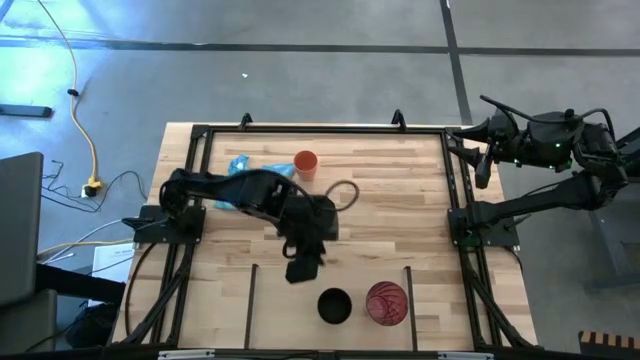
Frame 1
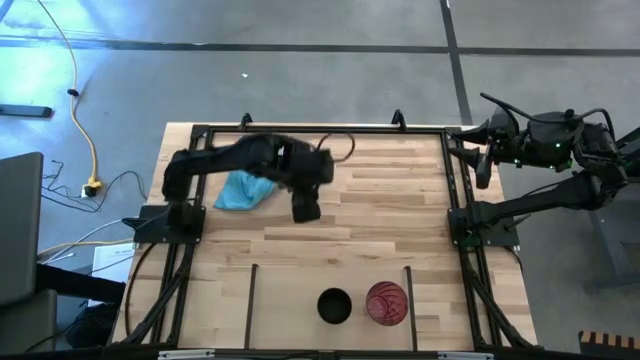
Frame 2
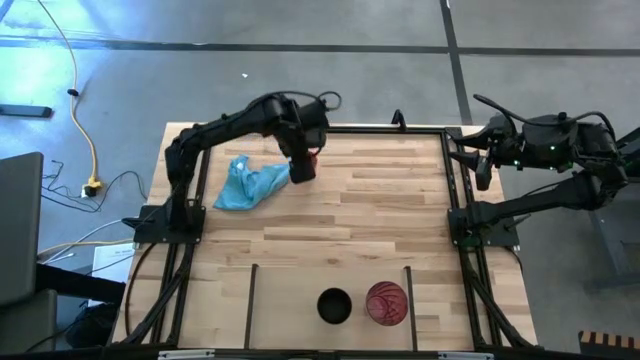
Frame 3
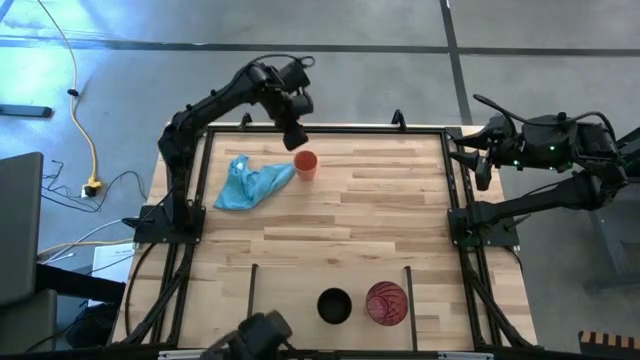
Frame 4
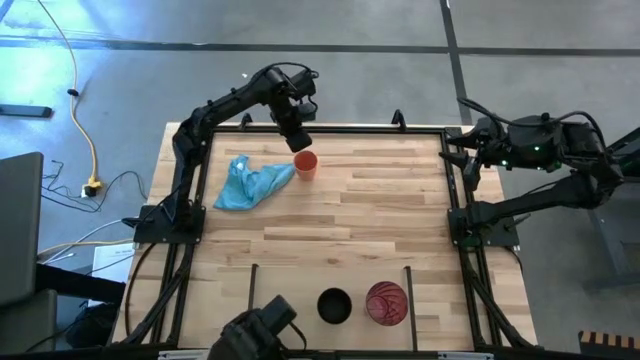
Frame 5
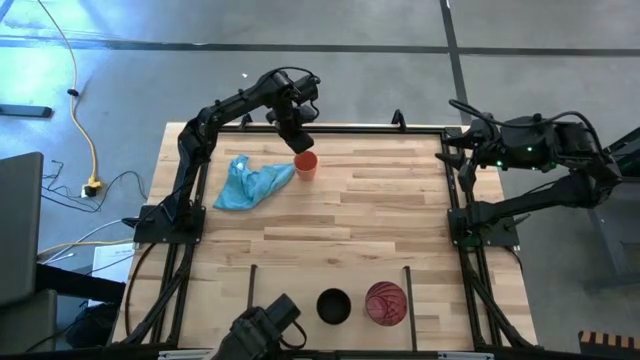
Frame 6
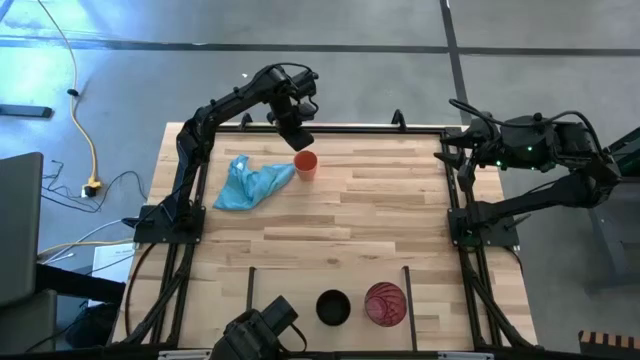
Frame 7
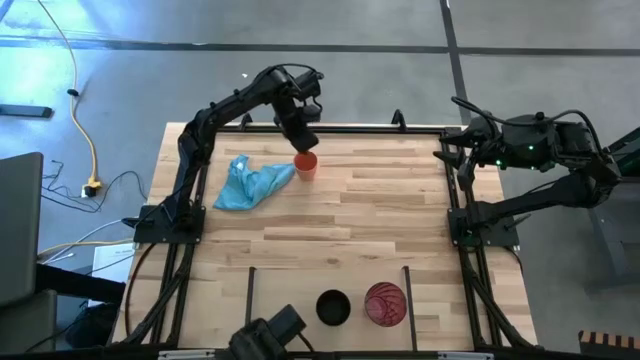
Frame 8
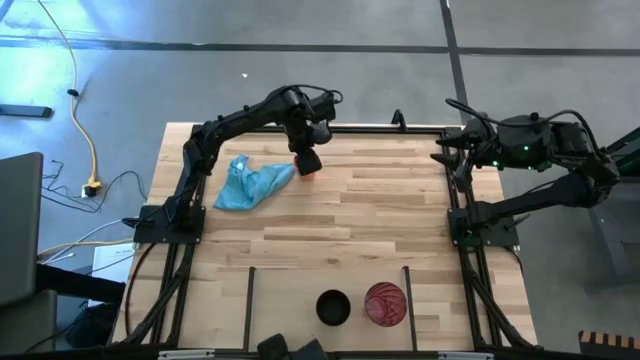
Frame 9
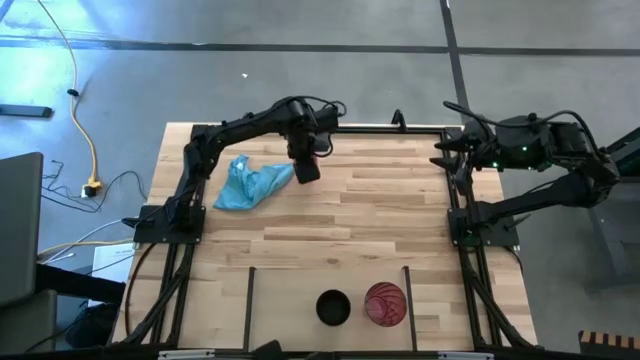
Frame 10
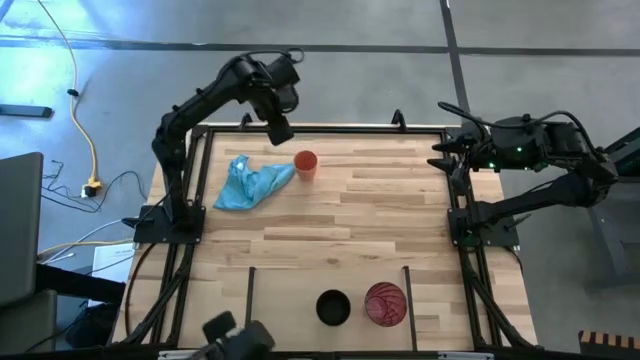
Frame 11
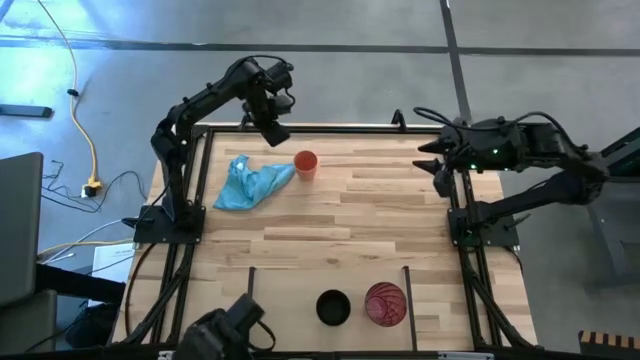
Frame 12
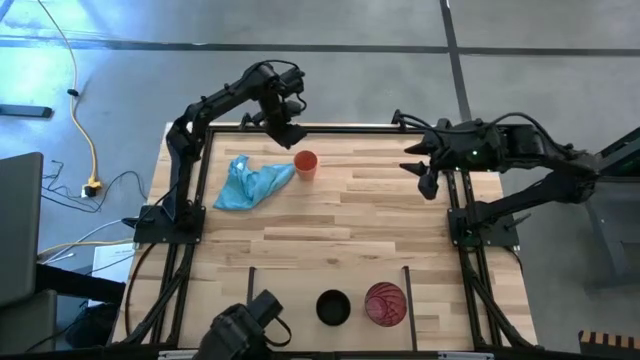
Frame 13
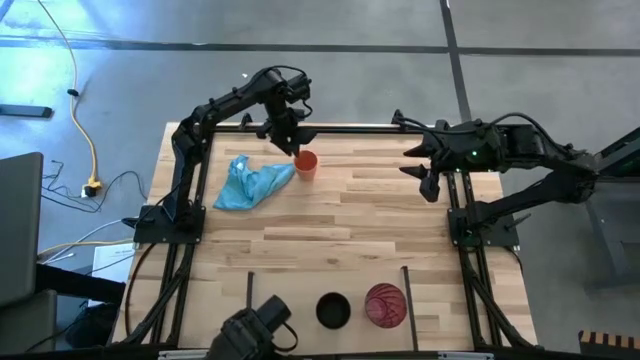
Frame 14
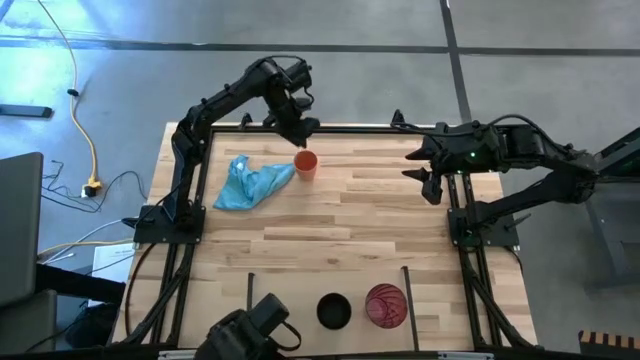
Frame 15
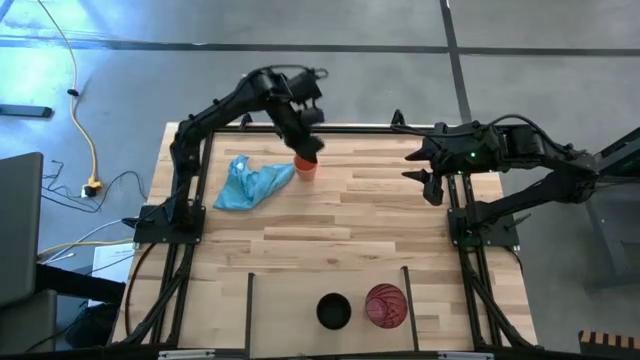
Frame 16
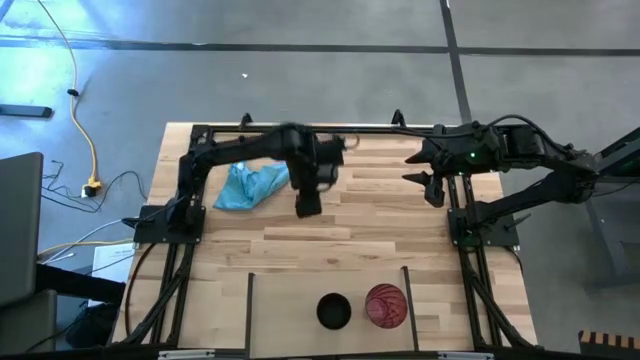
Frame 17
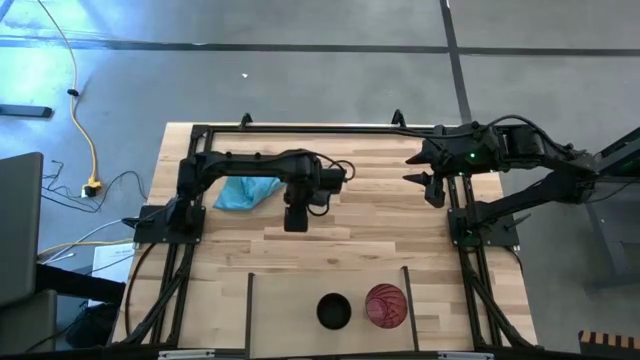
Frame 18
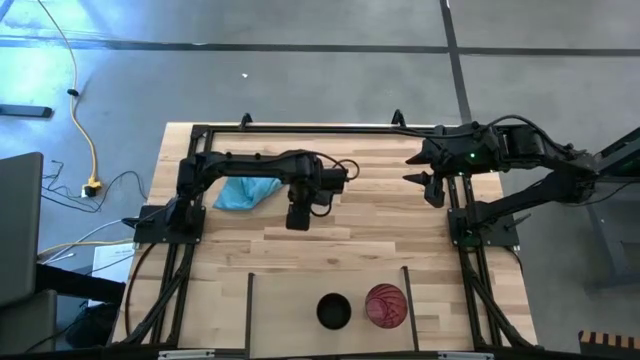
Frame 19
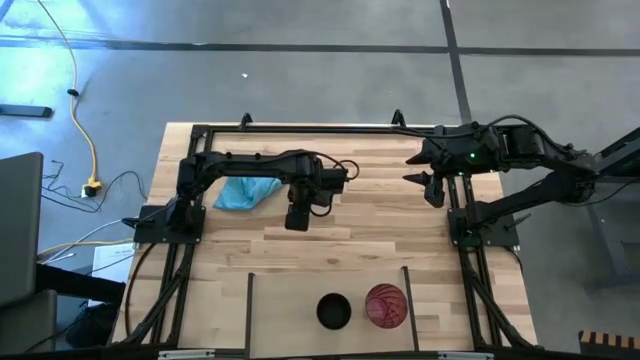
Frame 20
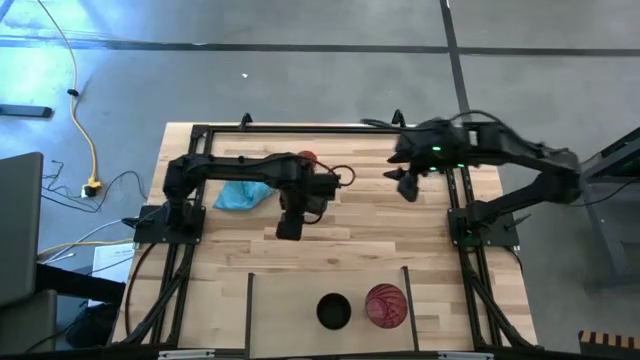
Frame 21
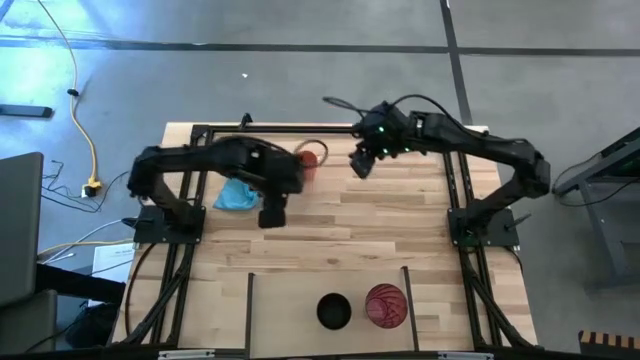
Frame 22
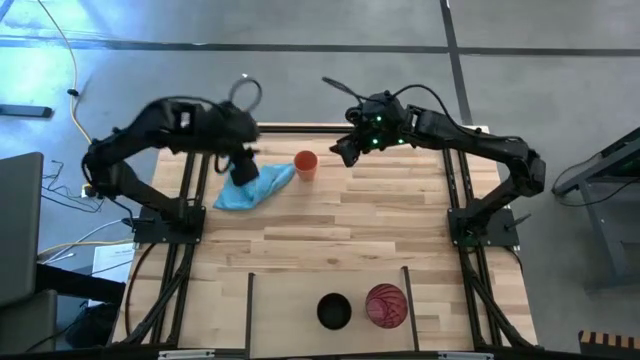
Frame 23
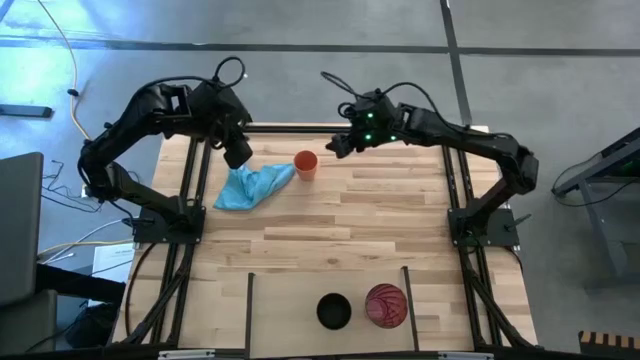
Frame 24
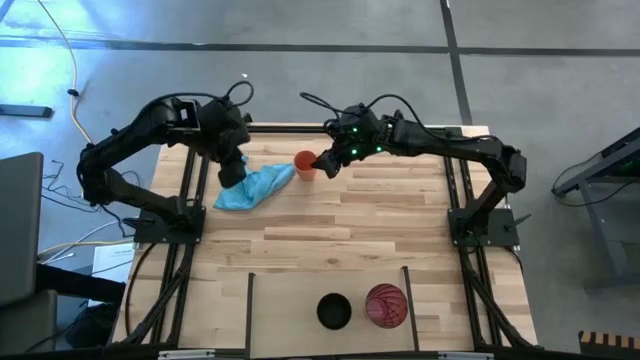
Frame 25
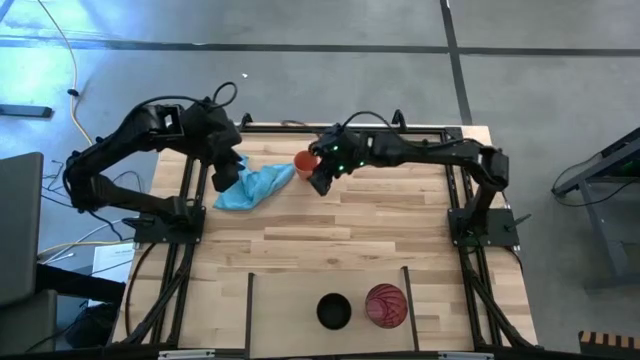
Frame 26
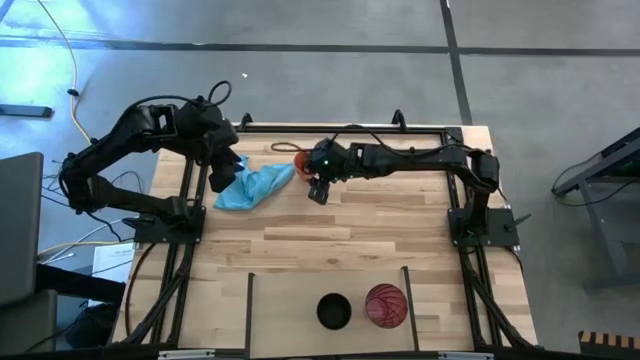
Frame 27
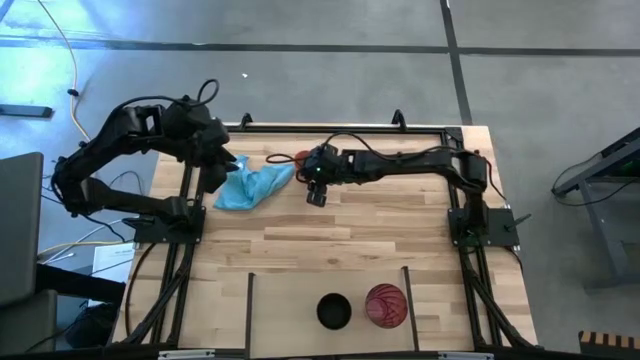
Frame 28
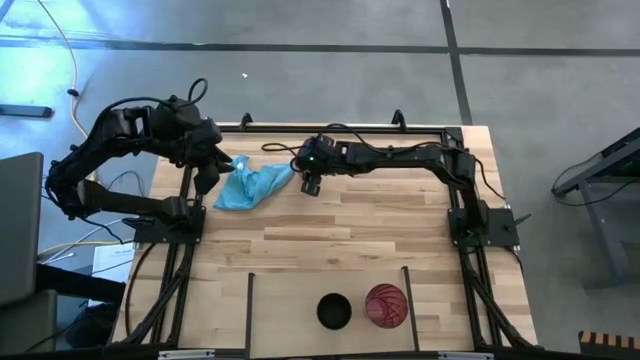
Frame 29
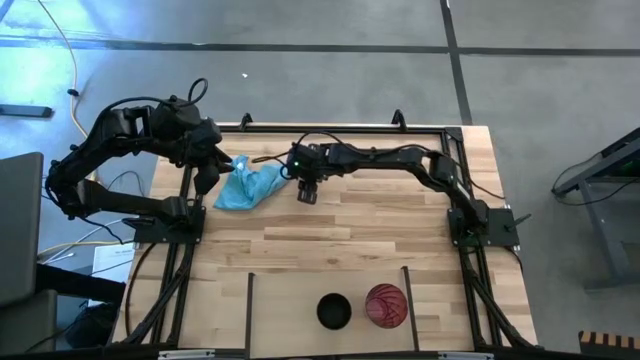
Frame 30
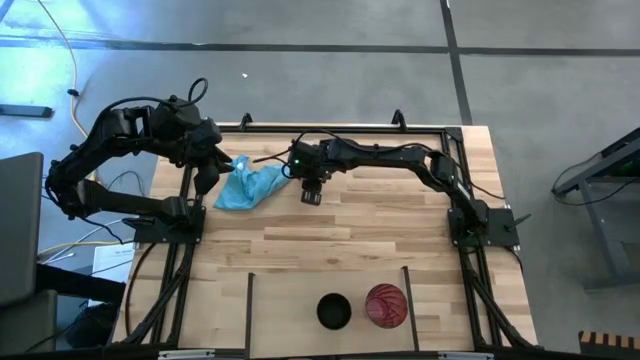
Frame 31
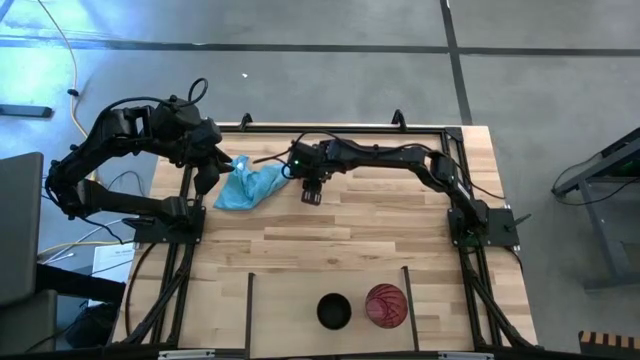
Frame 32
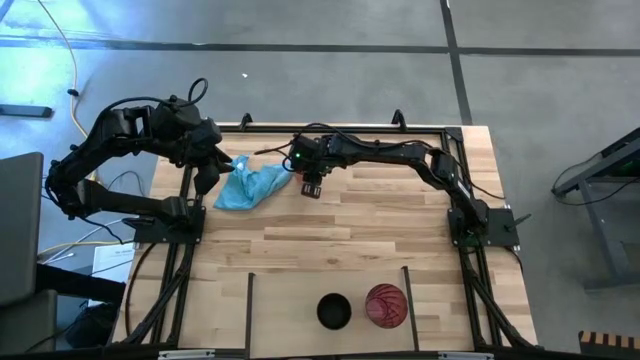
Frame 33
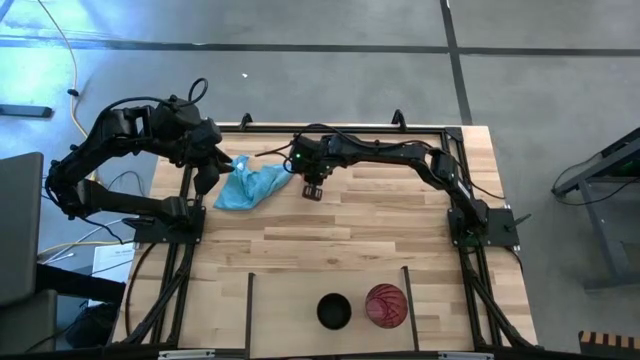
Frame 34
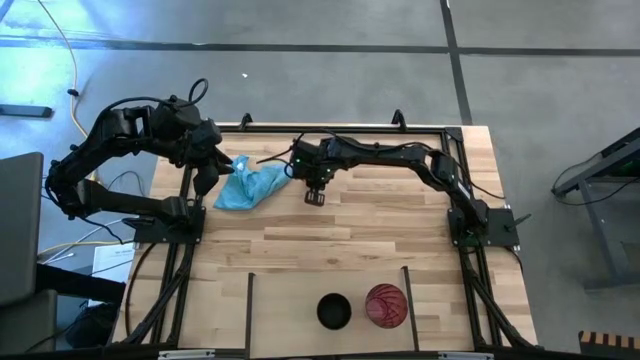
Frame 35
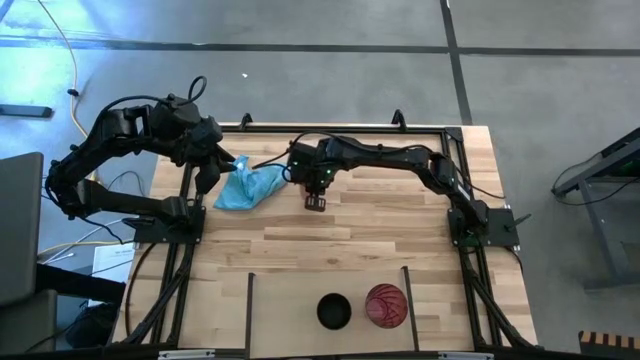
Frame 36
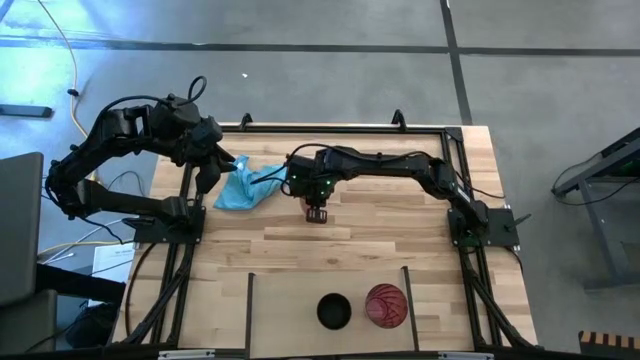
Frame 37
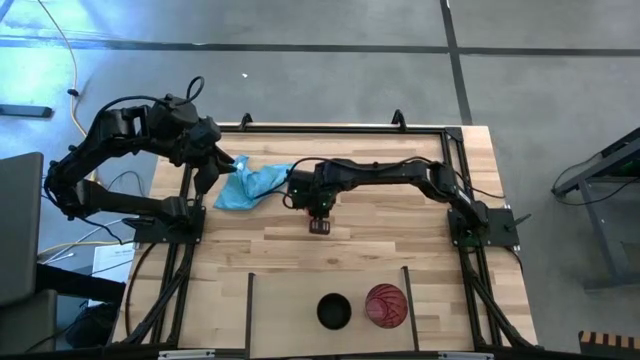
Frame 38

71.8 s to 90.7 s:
Task: Stack small to large cups/mugs on shelf
Put the orange cup on the shelf

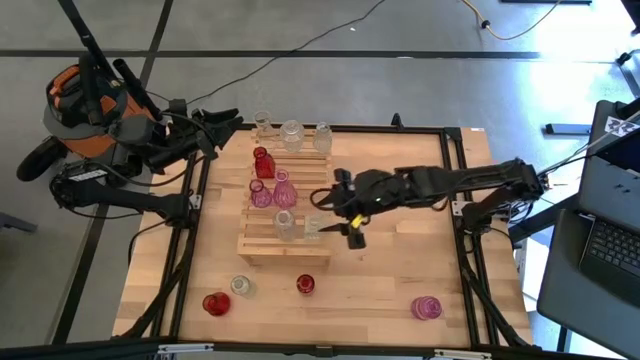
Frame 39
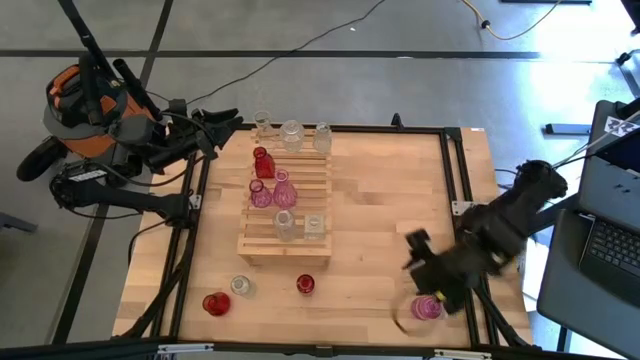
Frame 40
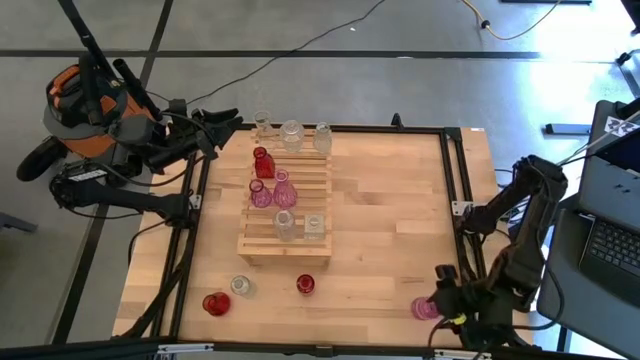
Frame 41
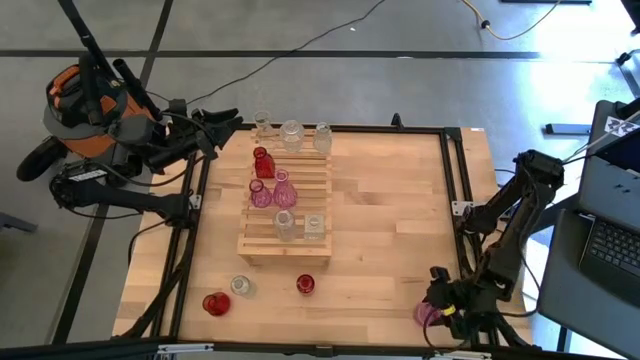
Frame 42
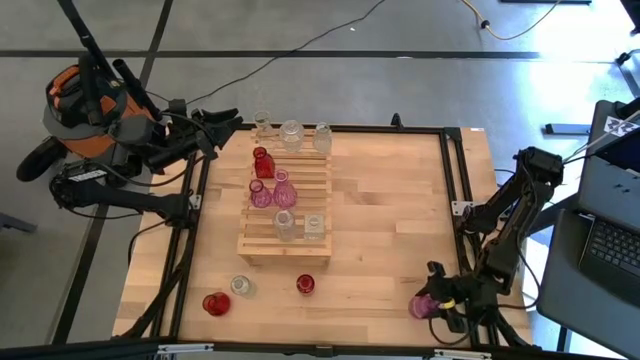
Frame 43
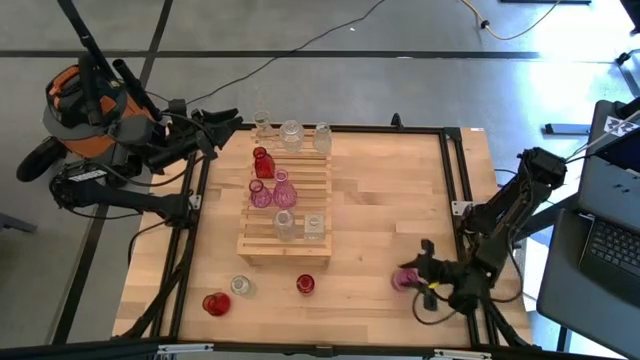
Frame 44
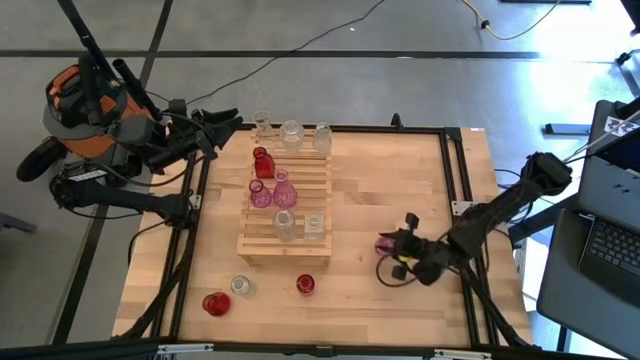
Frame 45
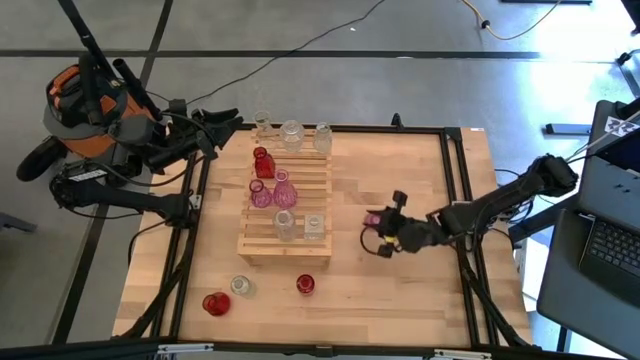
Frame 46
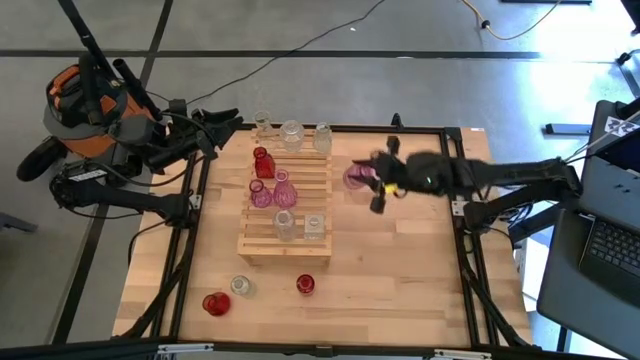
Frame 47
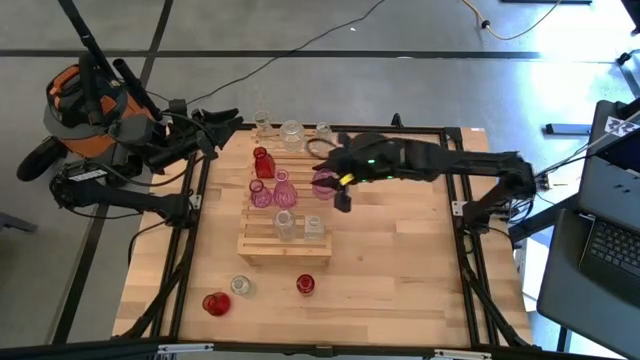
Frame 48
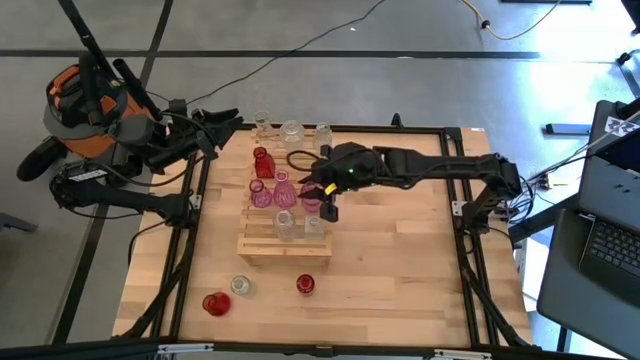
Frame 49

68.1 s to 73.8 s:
Task: sort vases onto shelf
Put the pink vase on the shelf aligned with the other pink vase
